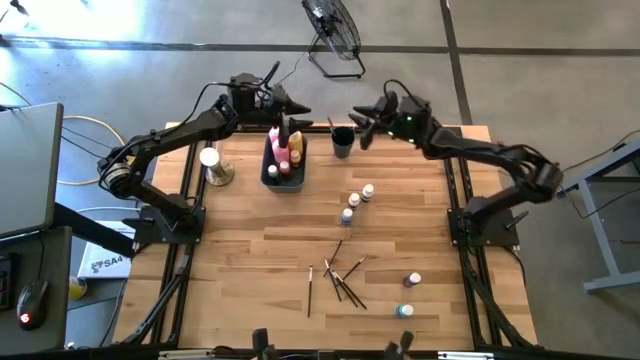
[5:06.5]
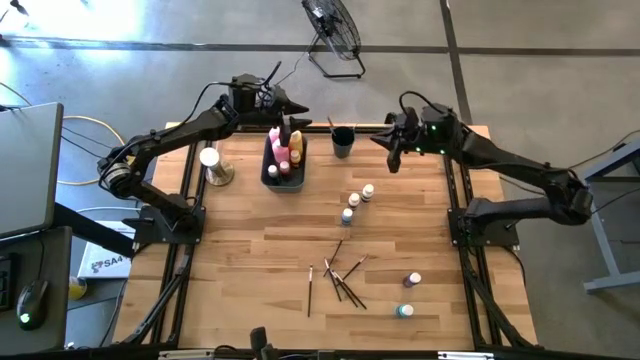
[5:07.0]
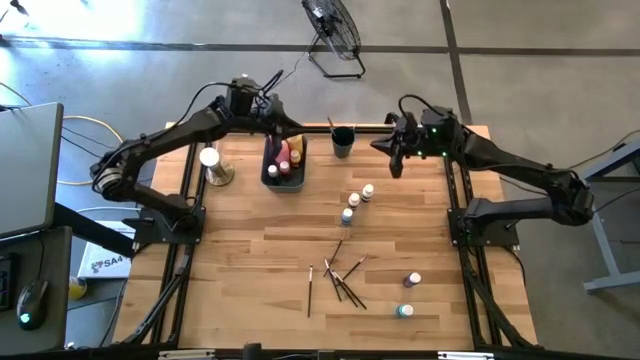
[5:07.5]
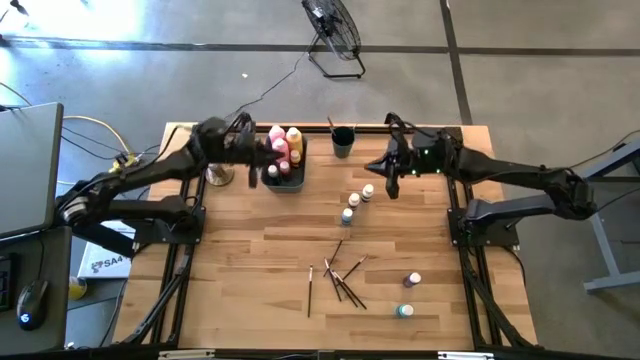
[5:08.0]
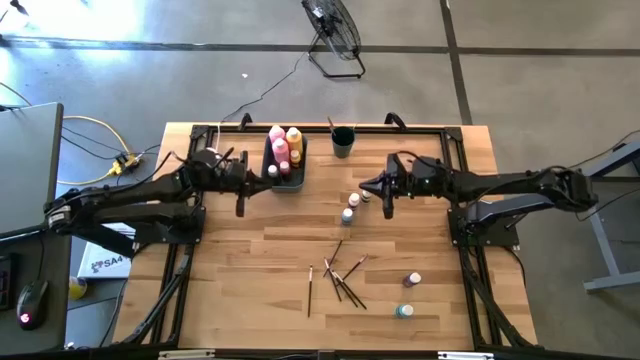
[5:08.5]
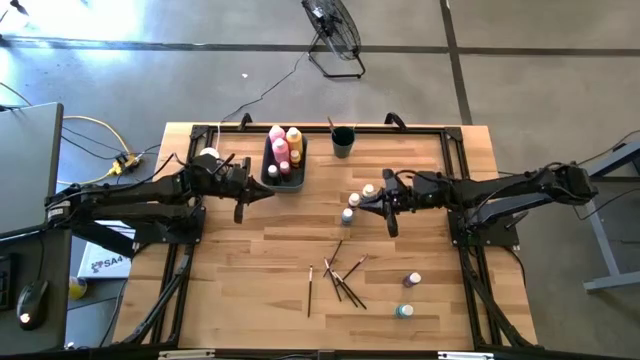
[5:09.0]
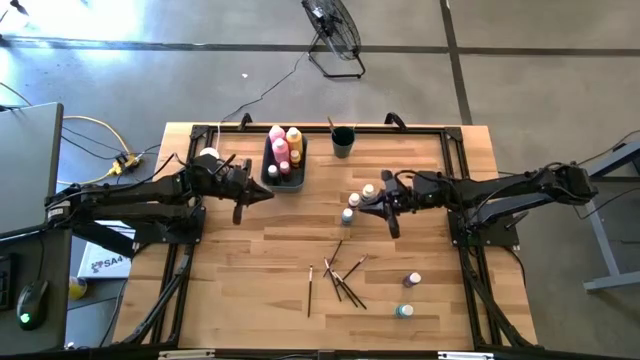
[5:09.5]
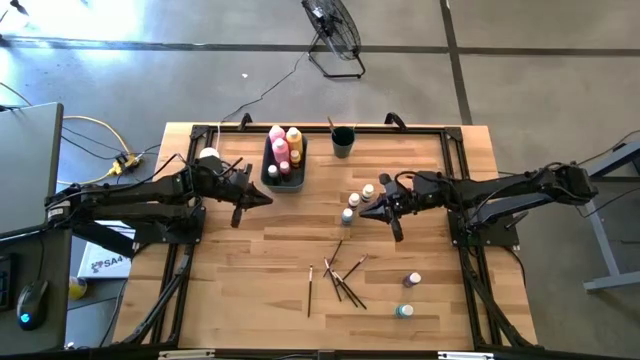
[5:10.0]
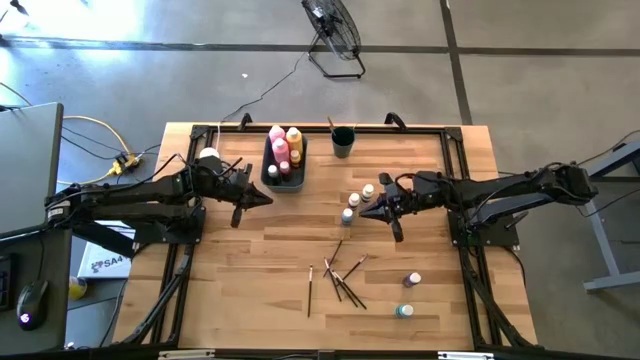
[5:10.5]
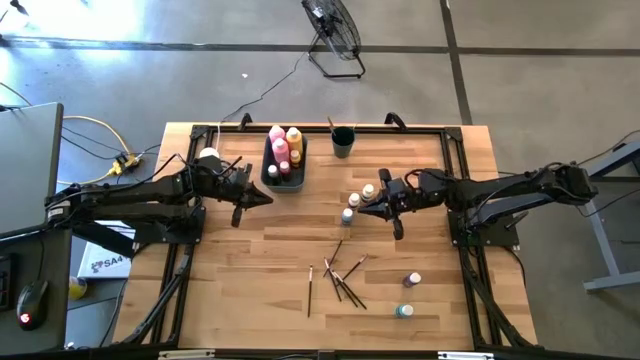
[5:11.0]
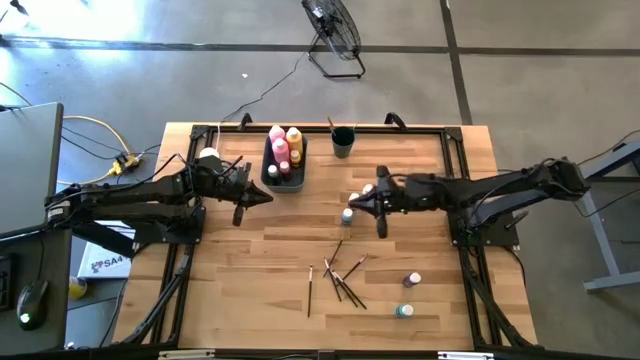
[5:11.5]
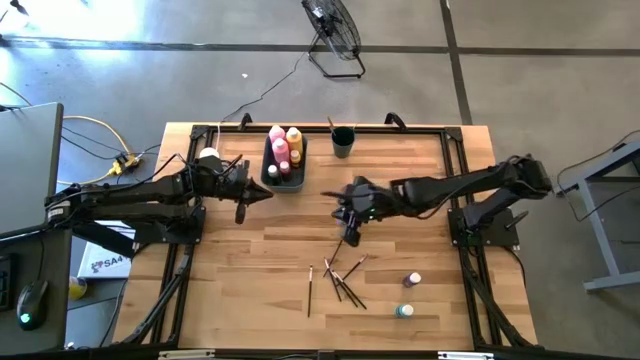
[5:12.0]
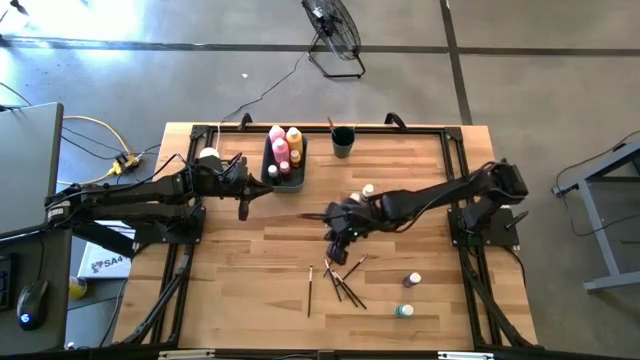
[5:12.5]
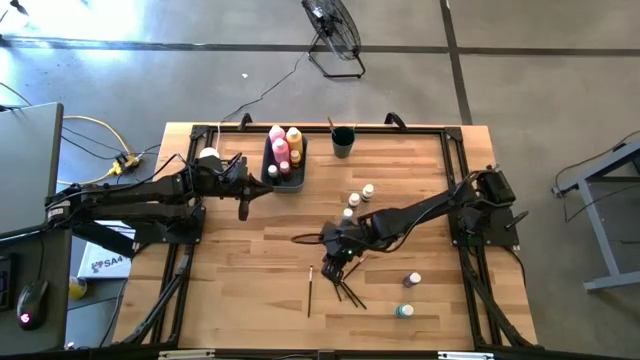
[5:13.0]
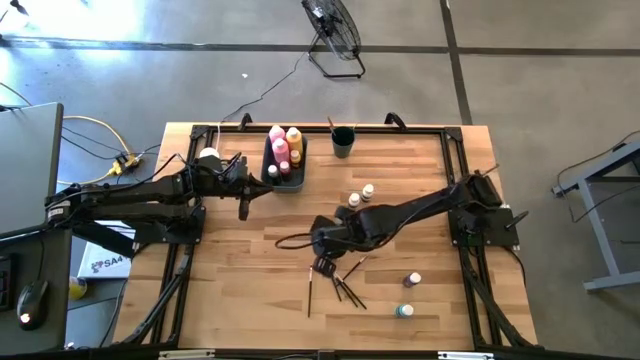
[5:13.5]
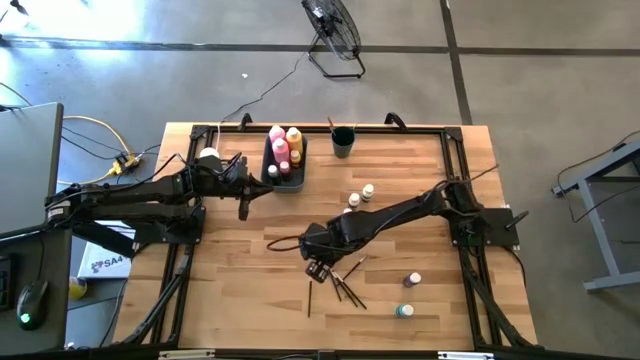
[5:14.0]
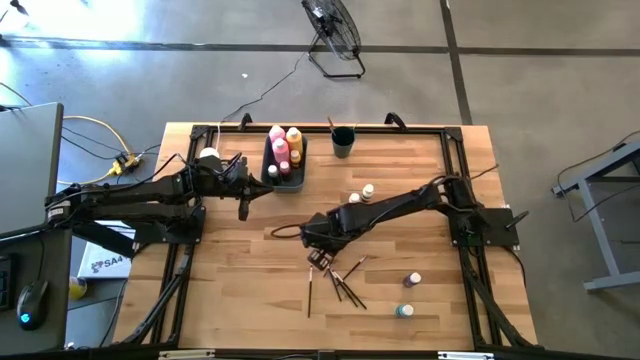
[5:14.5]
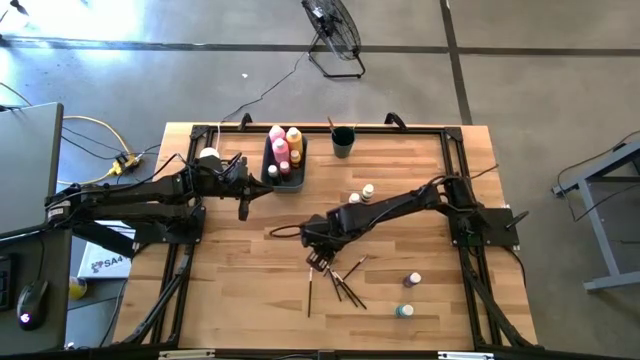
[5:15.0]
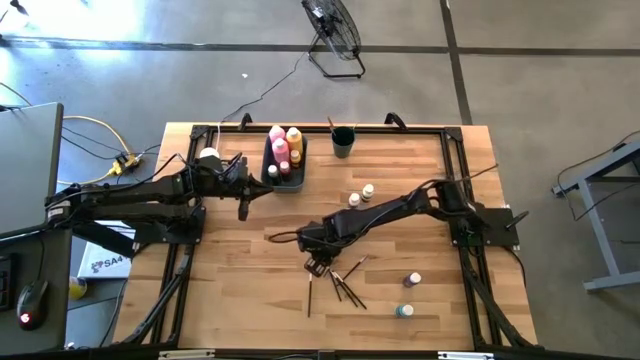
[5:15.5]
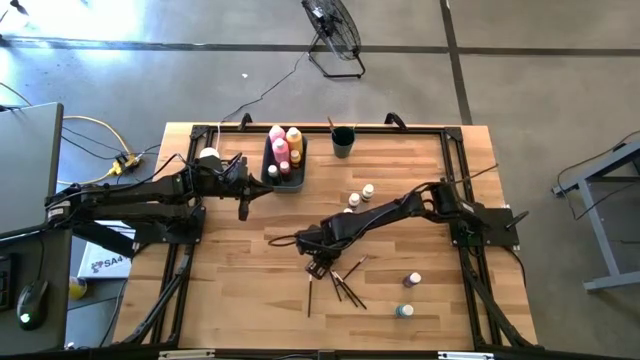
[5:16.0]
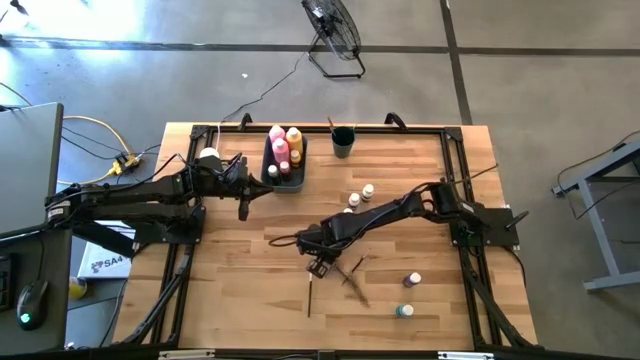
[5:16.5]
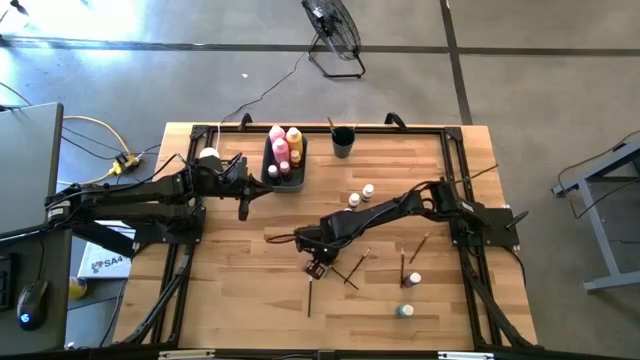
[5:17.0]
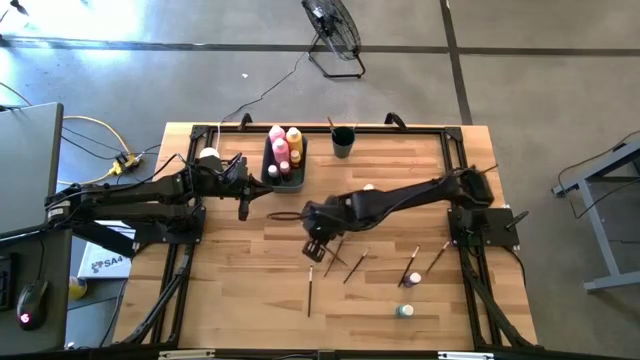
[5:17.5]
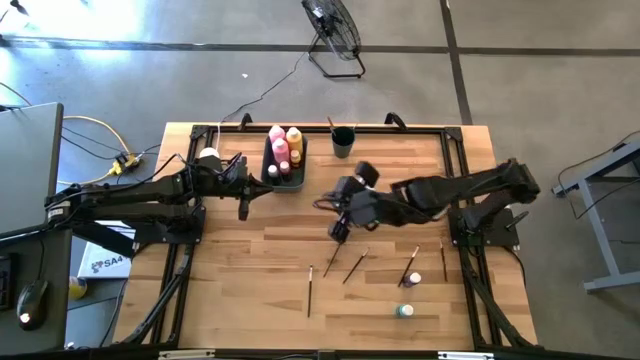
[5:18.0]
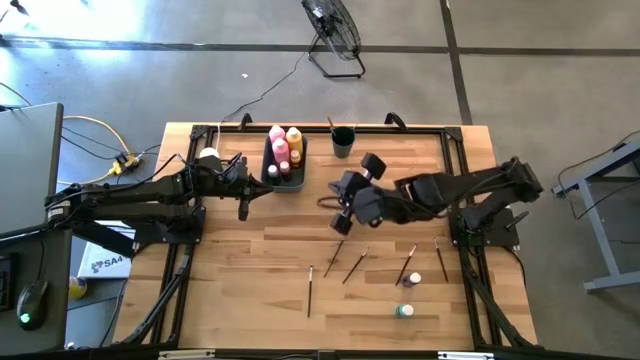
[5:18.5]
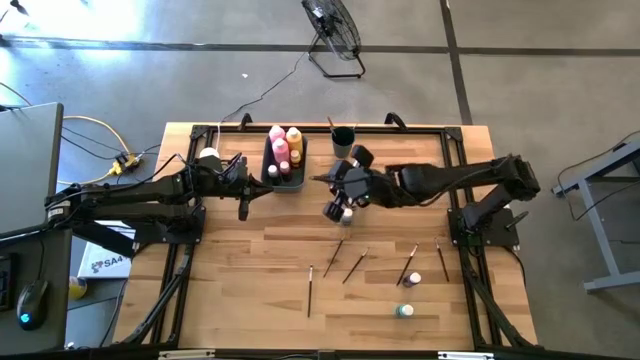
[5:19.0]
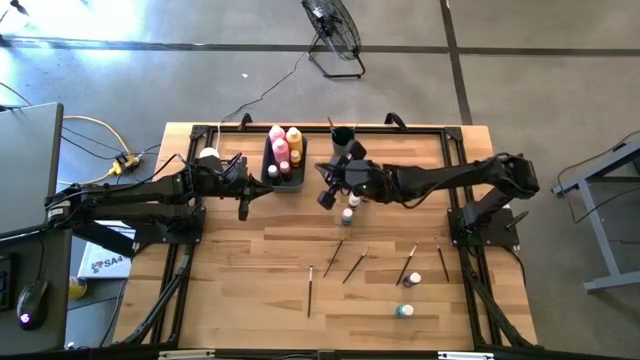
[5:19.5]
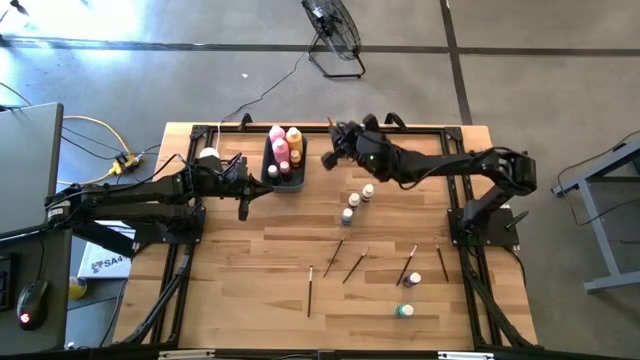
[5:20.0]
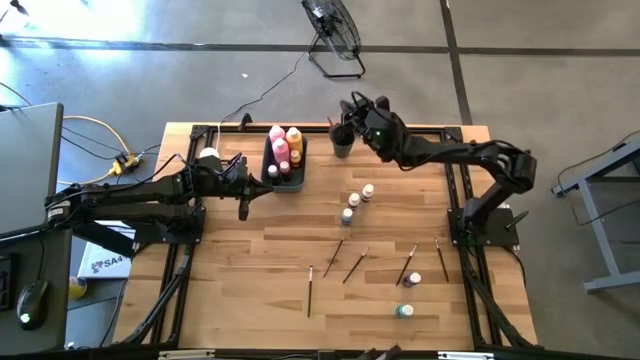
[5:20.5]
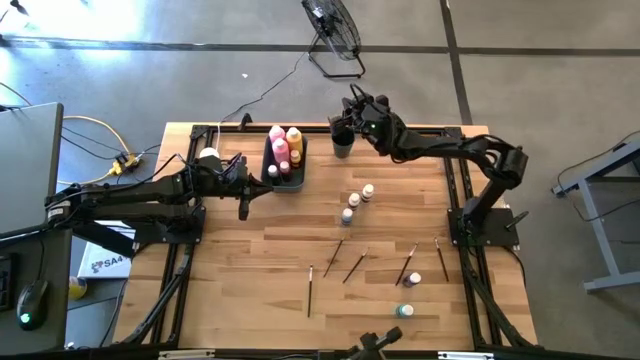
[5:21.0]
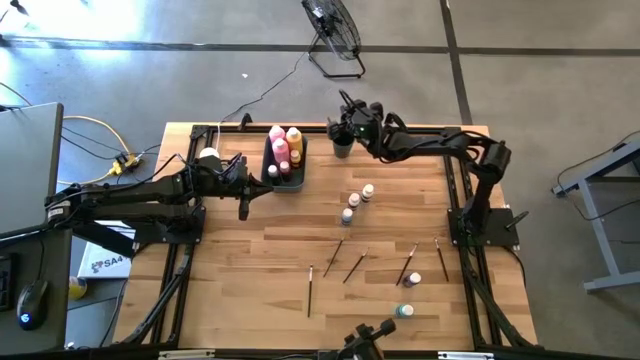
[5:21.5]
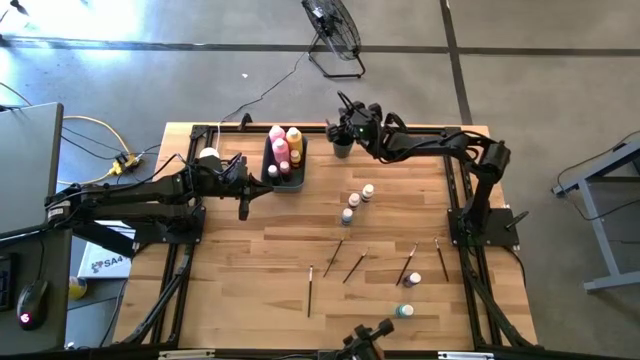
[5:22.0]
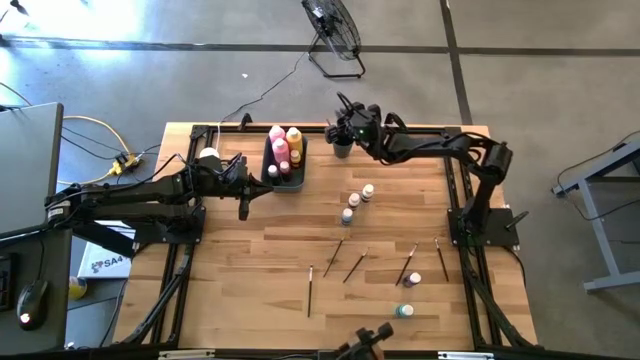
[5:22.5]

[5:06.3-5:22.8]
Task: Pick & Place Paint Supplies
Put the silver paint brush into the green cup
